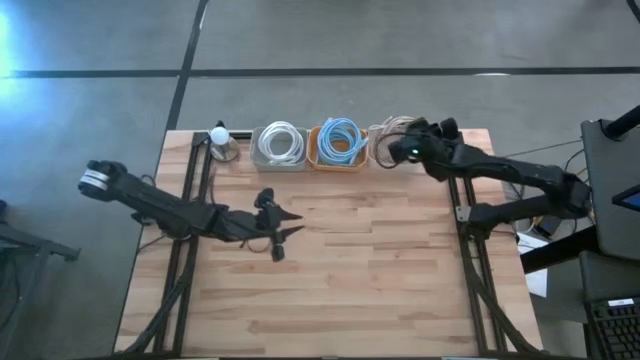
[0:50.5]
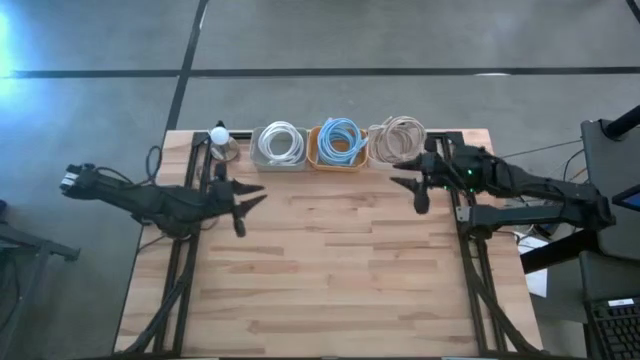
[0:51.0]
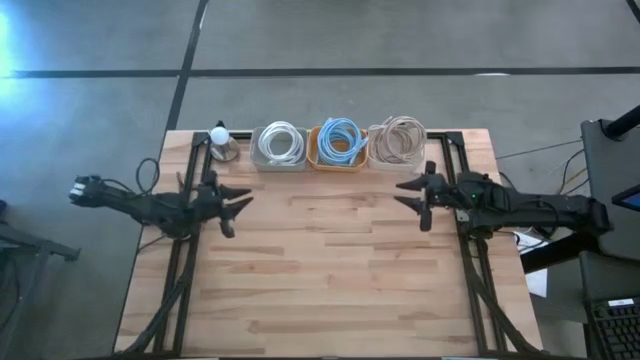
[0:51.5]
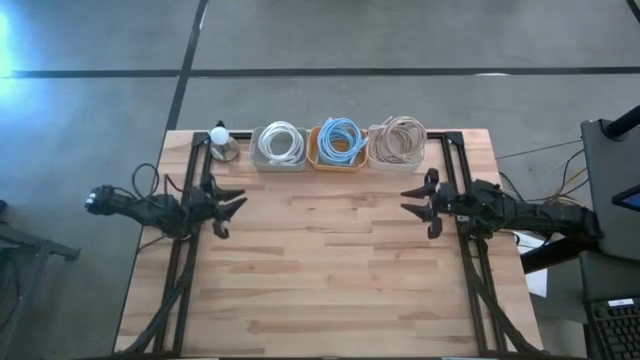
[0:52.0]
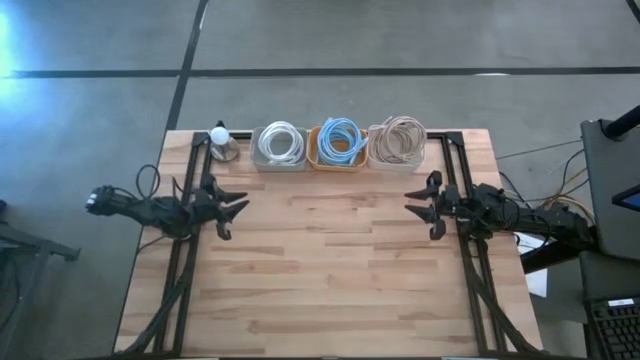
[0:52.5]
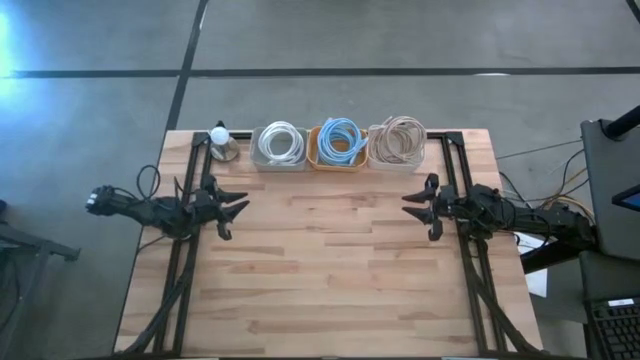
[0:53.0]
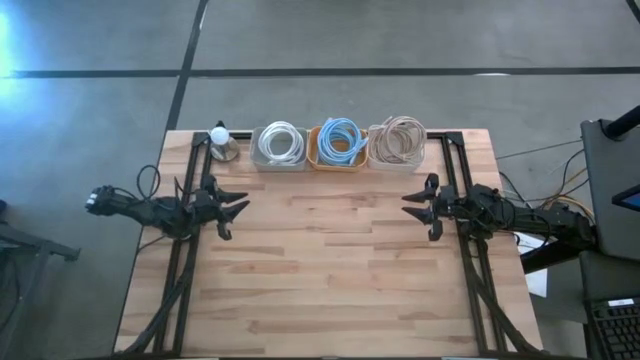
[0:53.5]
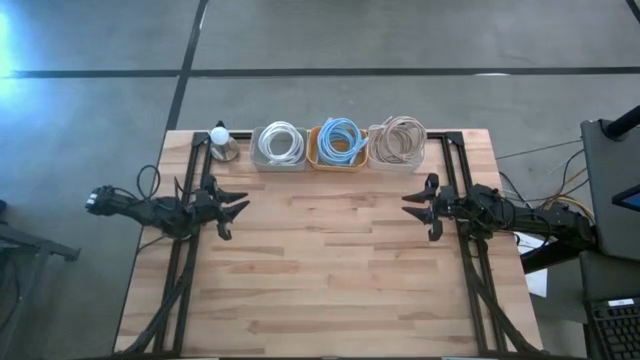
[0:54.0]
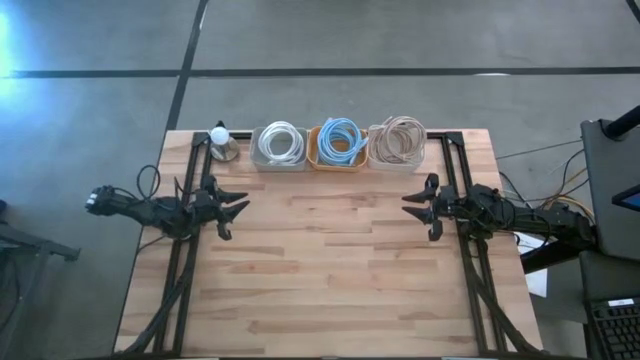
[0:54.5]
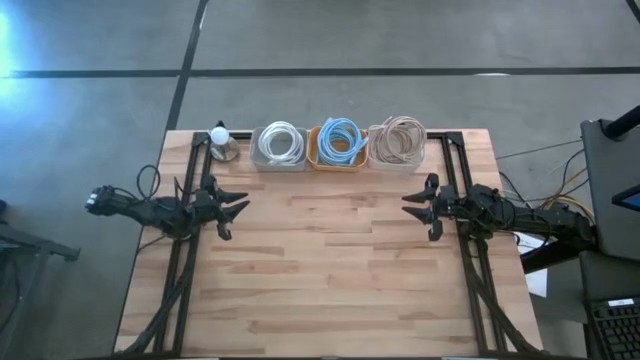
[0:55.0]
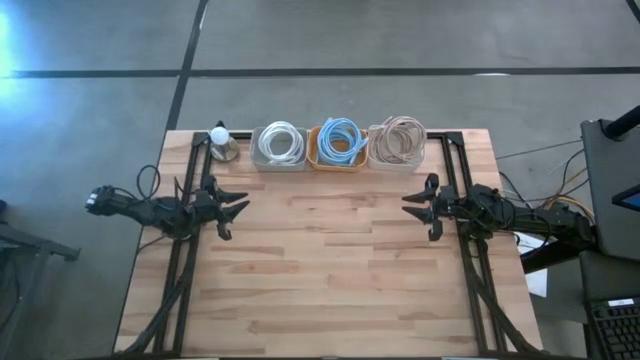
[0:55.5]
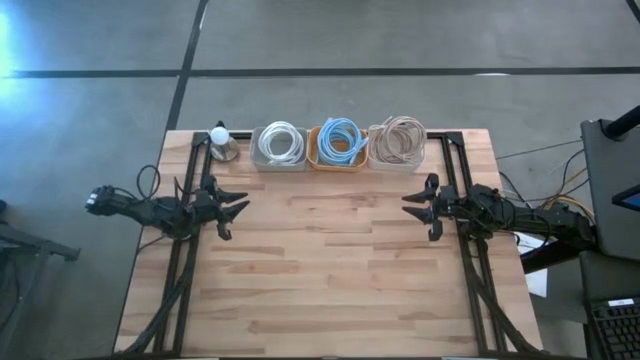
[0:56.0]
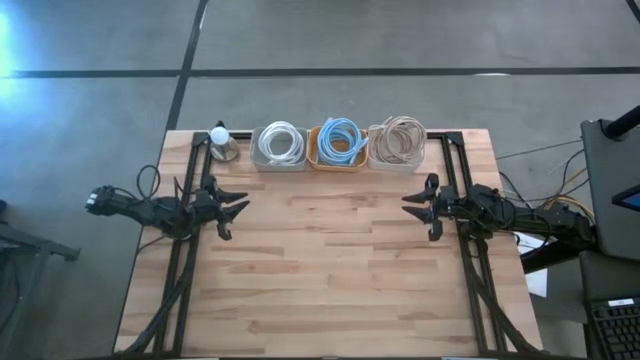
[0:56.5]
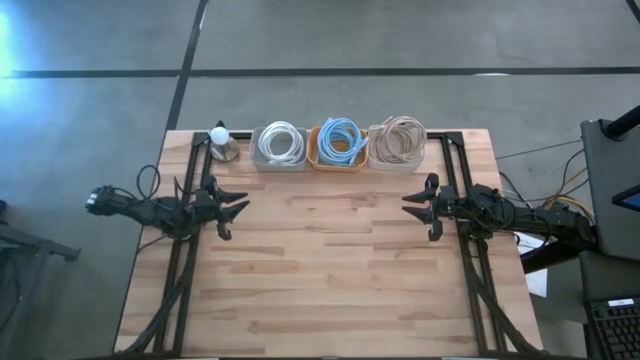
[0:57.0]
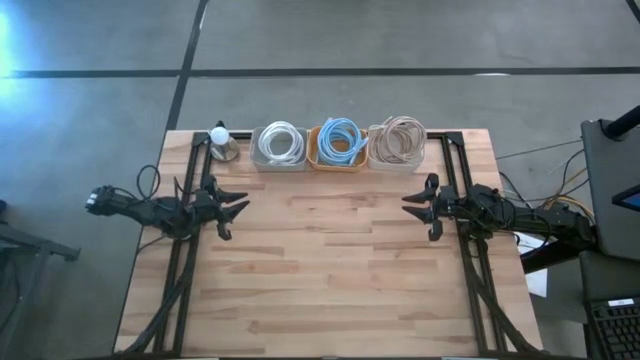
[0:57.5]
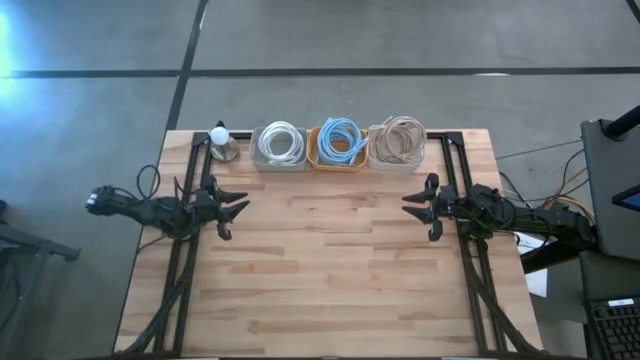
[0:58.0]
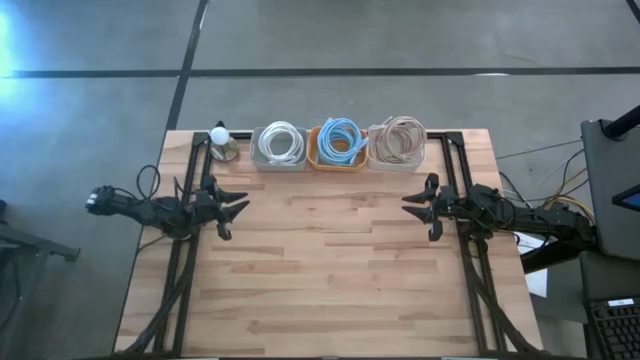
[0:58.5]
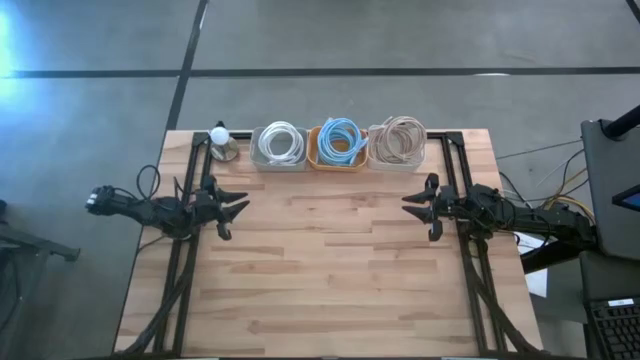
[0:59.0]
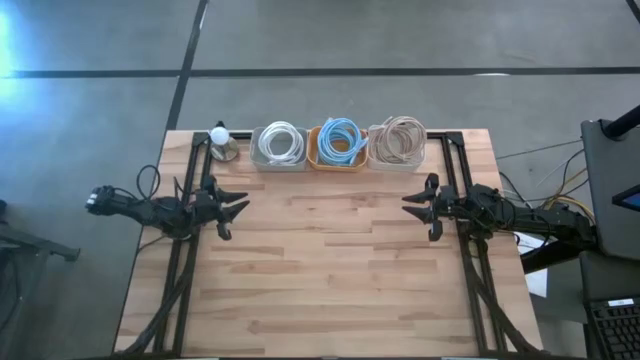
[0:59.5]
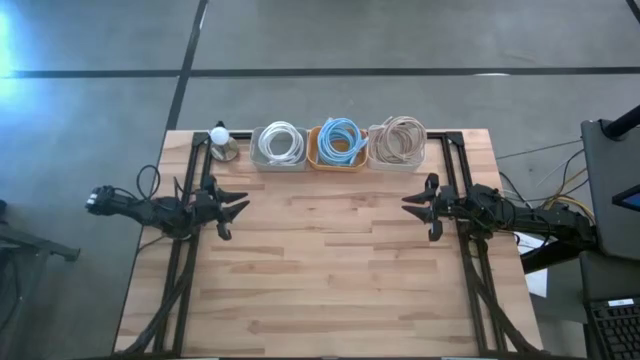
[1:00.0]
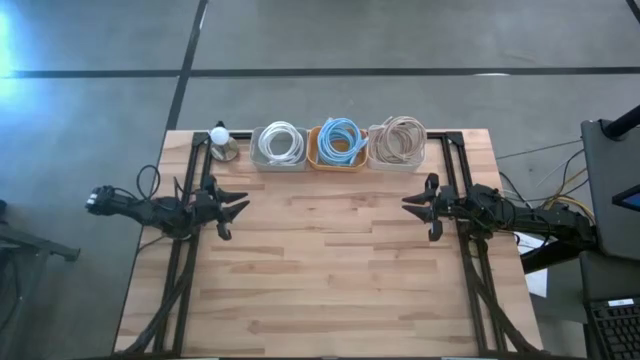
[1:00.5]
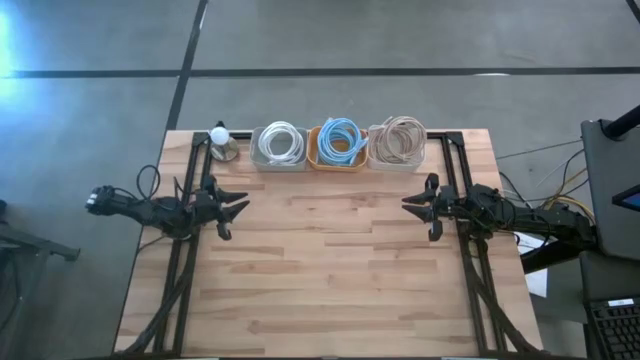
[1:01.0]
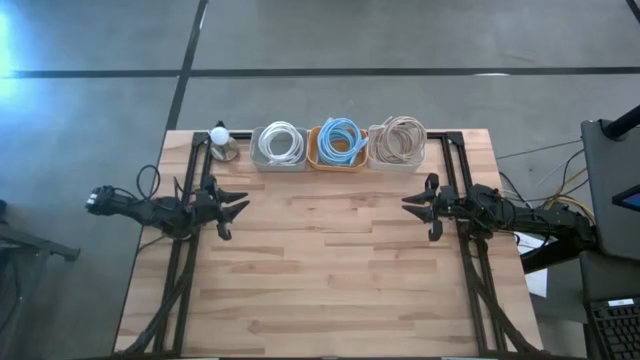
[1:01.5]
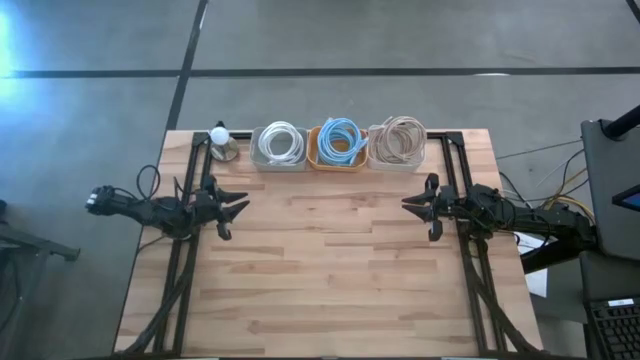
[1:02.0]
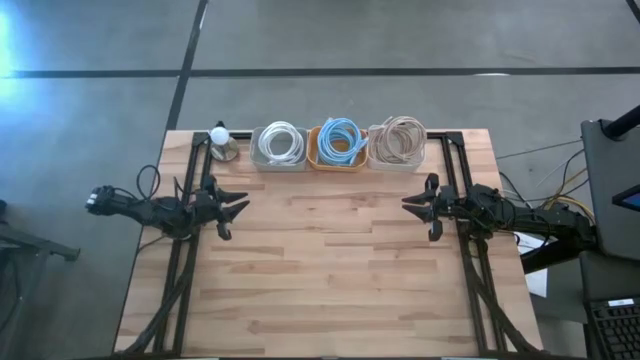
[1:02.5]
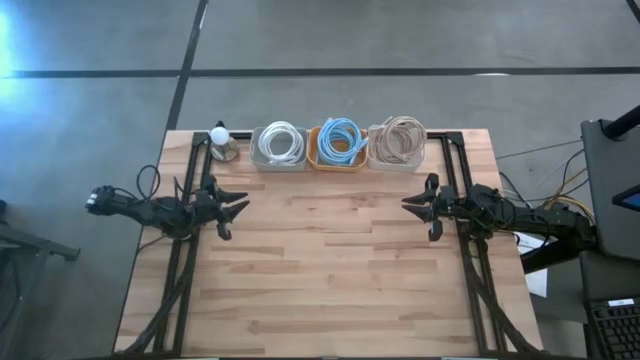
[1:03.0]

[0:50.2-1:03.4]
Task: Pick & Place USB Port
Return to Home Position

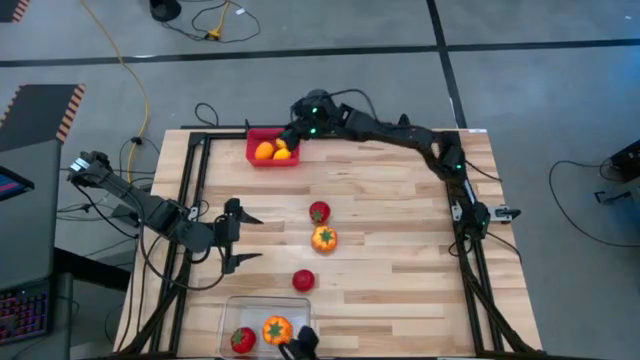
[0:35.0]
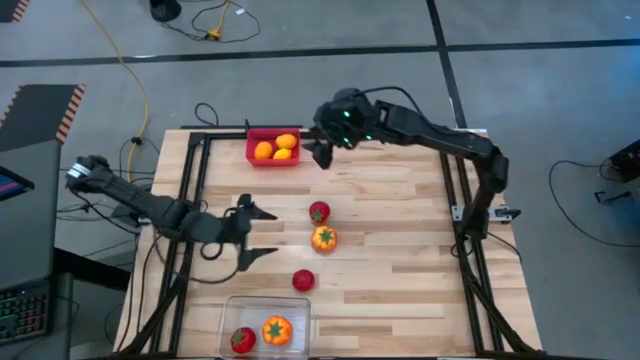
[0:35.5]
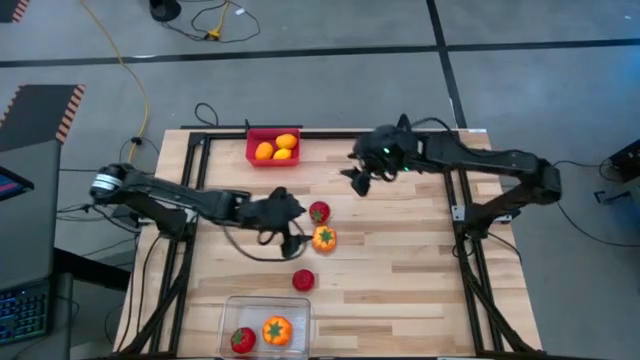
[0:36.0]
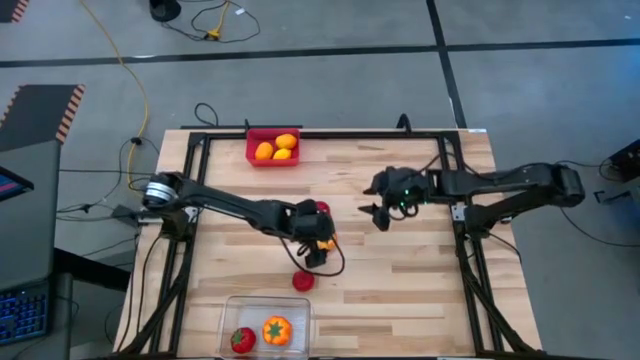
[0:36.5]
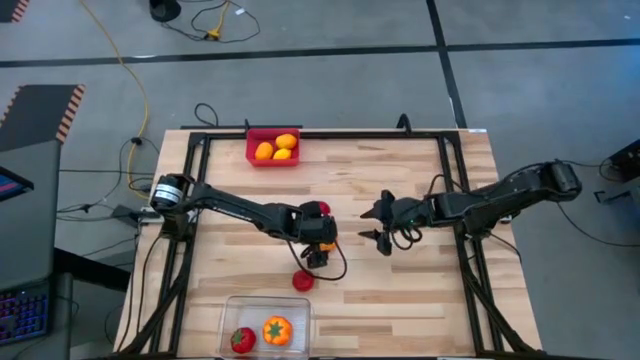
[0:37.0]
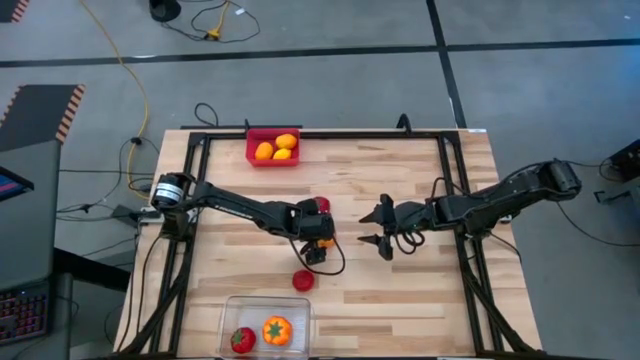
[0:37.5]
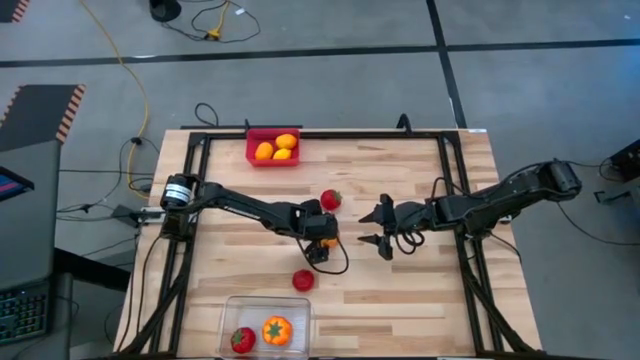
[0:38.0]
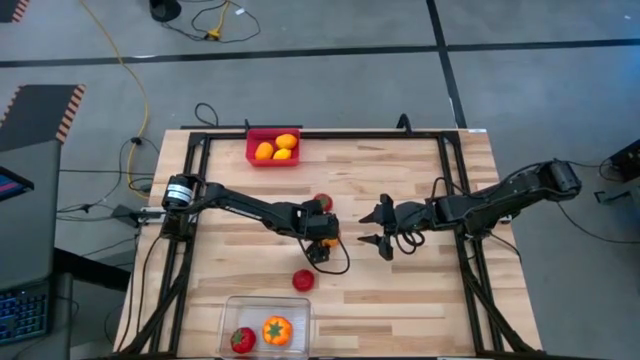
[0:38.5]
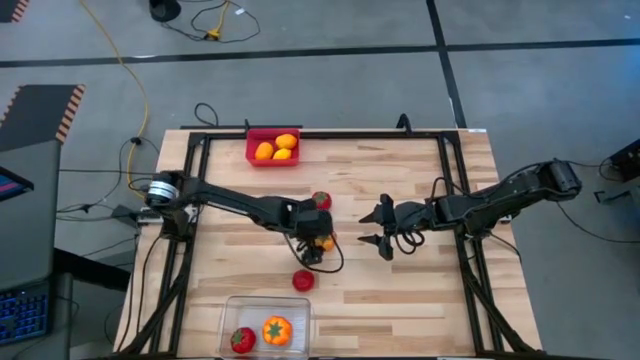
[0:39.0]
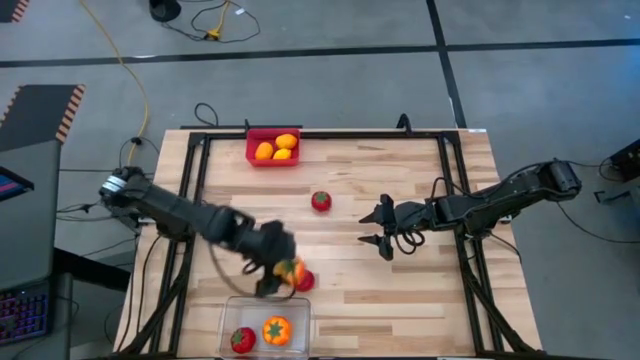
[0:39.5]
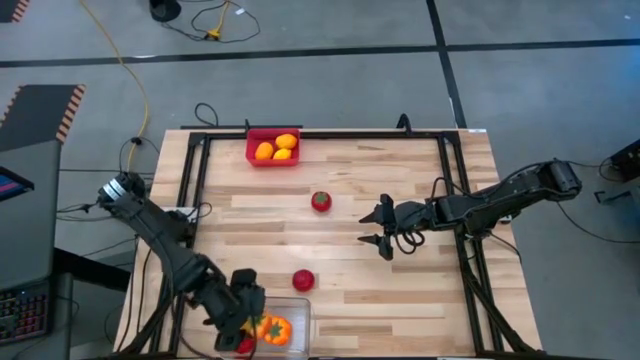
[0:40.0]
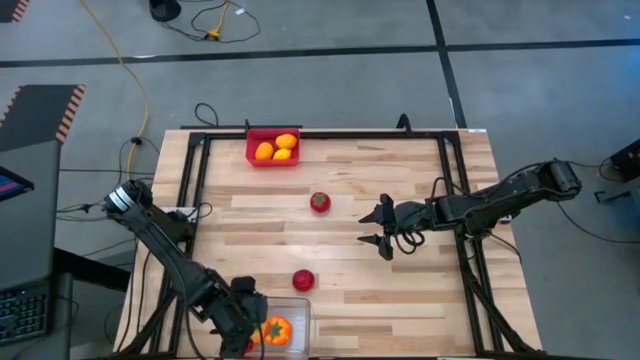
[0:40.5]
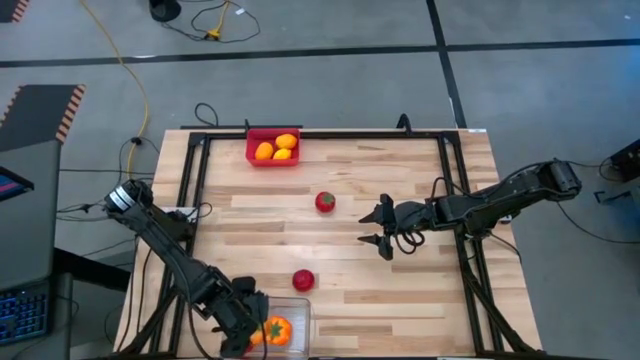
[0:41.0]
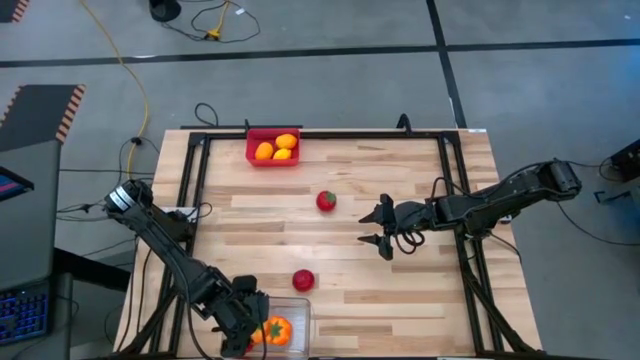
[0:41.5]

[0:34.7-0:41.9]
Task: Sort produce into baskets
Put the orange tomato into the transparent bin
